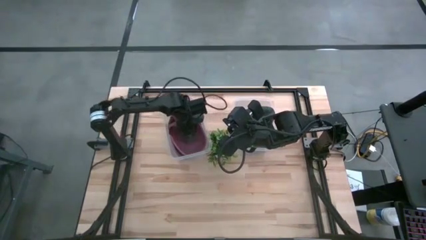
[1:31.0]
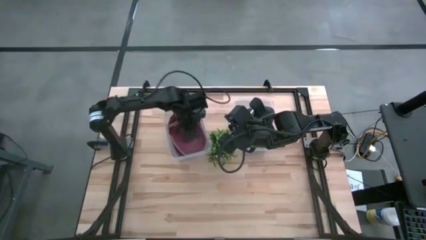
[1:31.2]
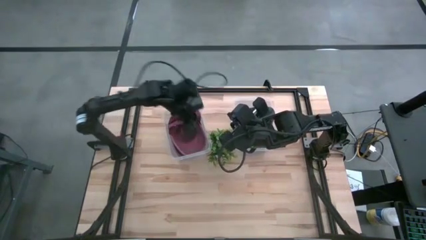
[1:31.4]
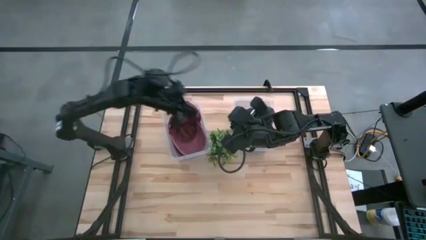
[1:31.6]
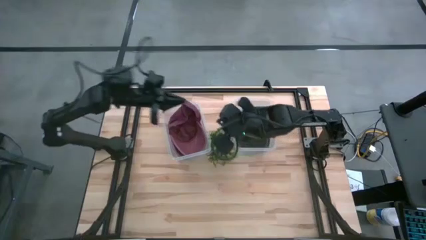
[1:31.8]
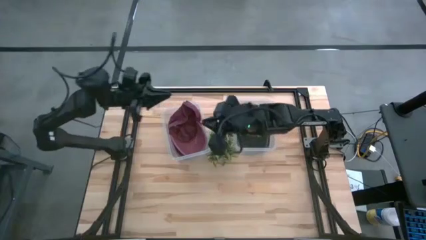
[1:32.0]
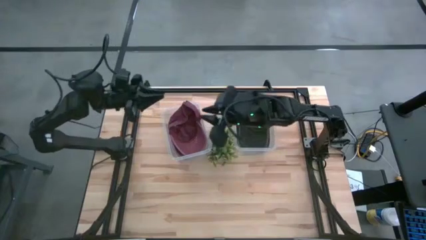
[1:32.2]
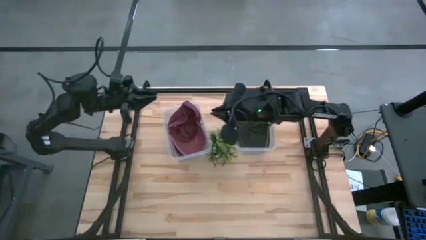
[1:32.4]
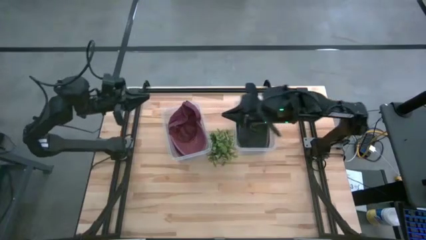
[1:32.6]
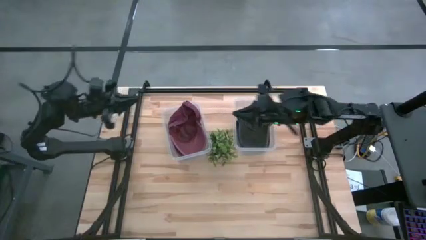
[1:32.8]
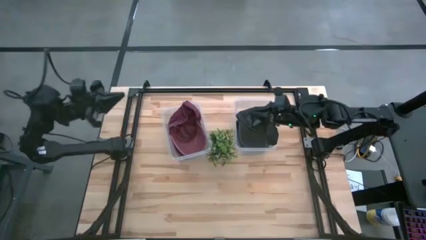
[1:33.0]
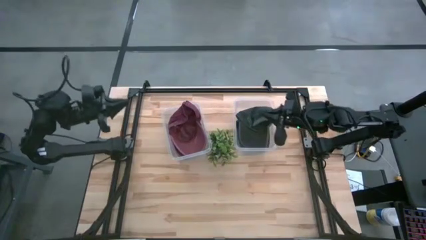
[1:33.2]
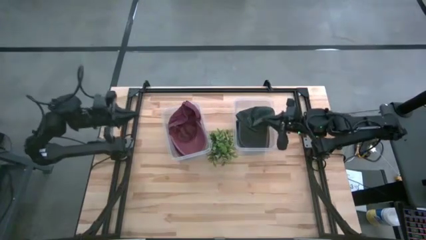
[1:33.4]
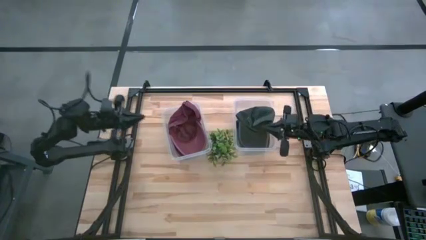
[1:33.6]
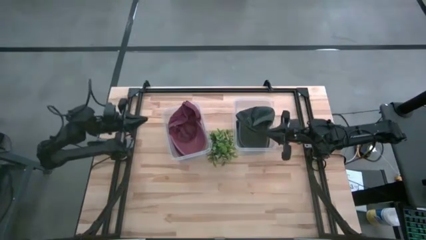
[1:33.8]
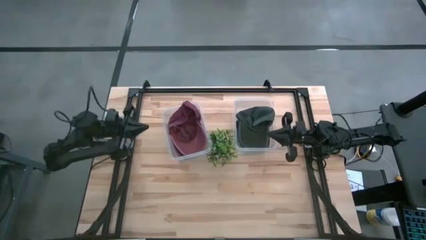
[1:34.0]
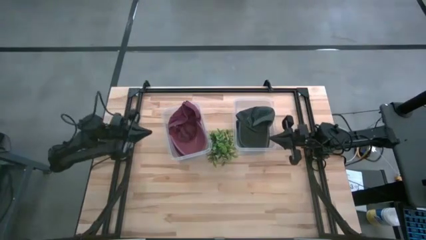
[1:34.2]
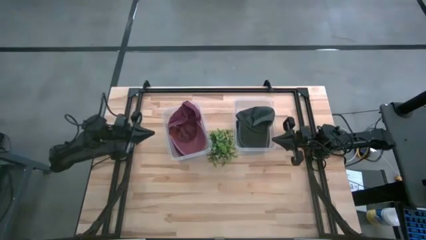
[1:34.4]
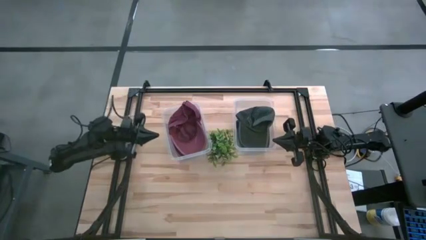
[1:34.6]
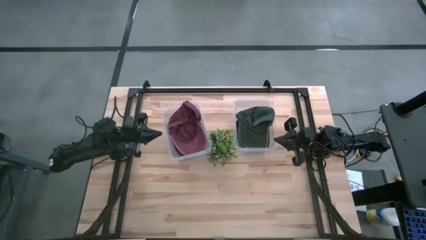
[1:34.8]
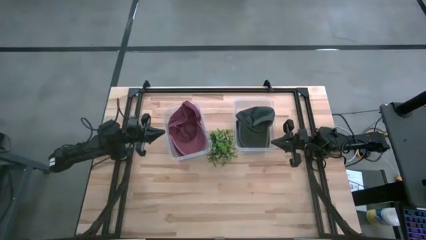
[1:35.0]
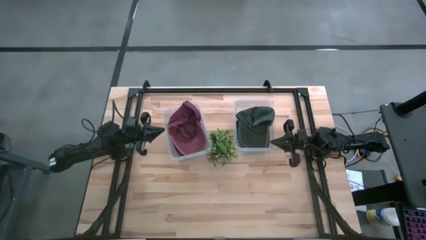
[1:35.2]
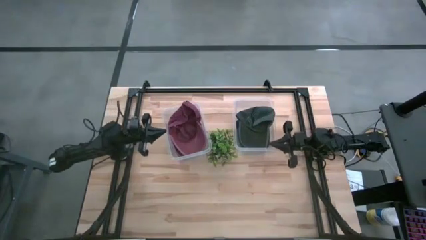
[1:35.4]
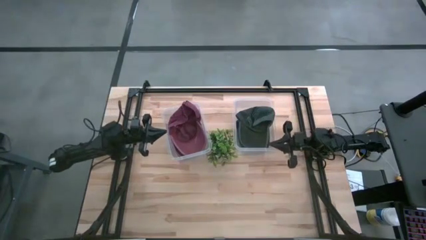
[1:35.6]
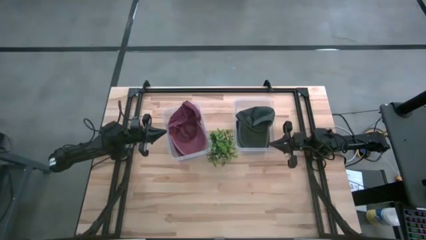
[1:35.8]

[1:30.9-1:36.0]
Task: Pick & Place hat
Return to home position

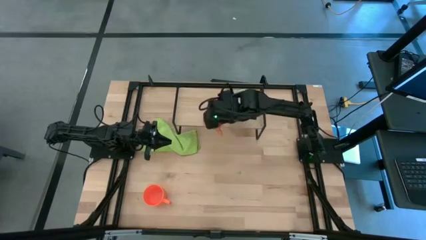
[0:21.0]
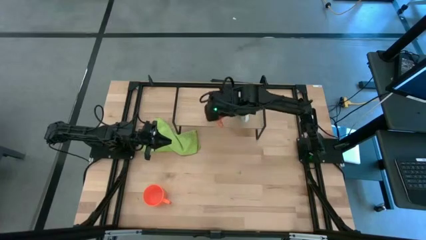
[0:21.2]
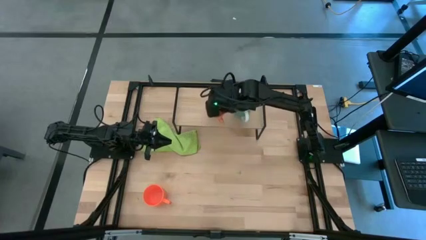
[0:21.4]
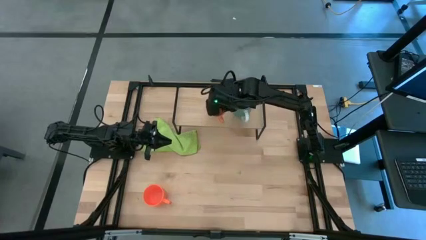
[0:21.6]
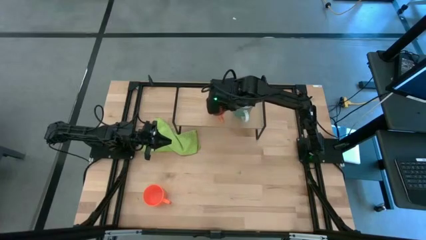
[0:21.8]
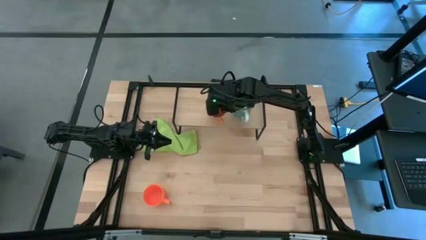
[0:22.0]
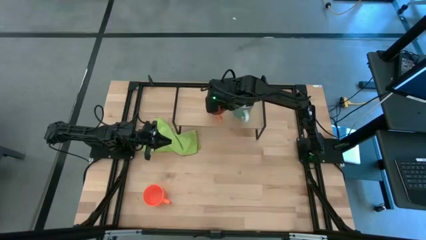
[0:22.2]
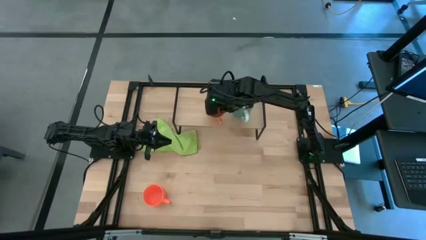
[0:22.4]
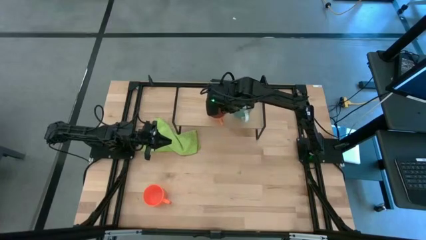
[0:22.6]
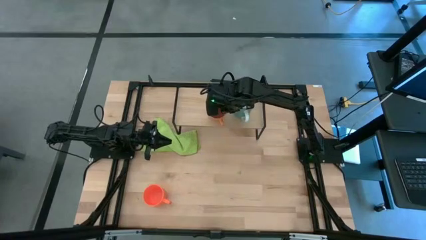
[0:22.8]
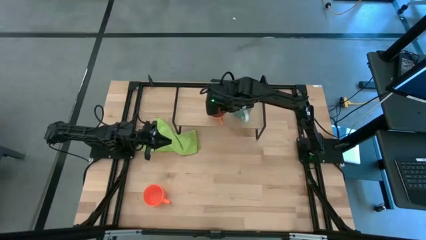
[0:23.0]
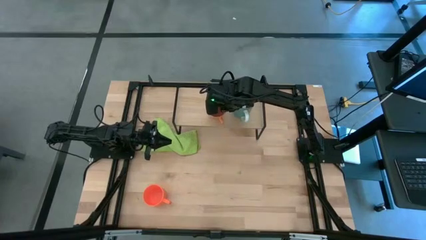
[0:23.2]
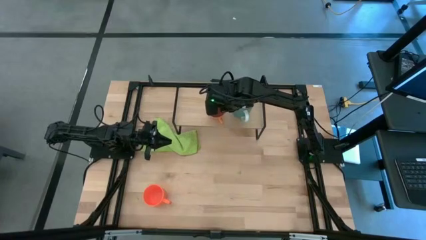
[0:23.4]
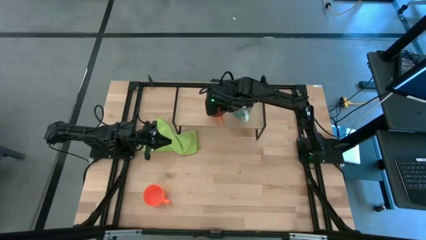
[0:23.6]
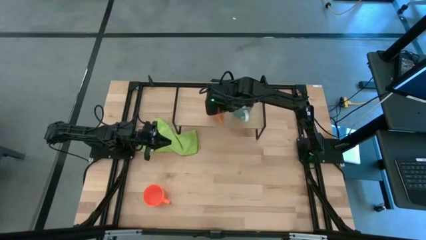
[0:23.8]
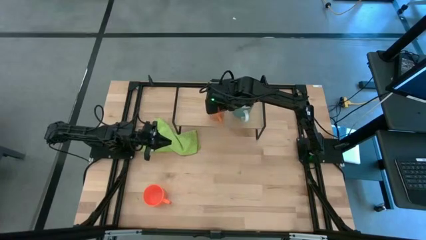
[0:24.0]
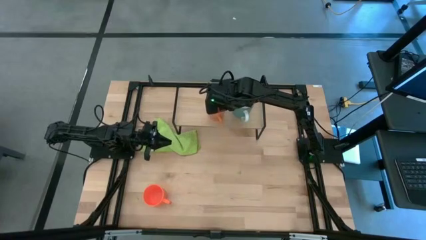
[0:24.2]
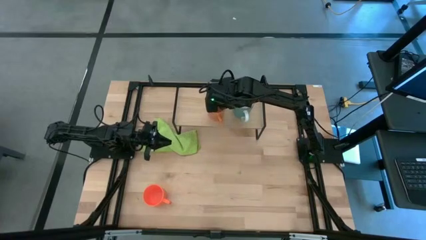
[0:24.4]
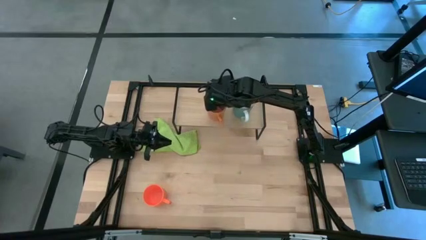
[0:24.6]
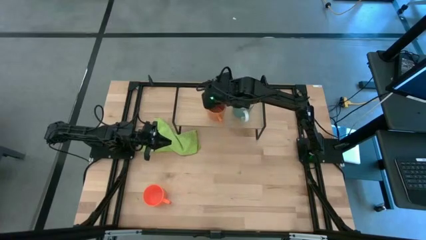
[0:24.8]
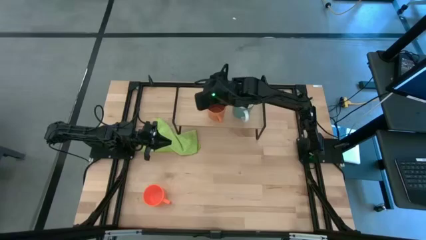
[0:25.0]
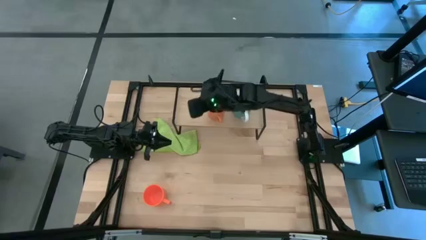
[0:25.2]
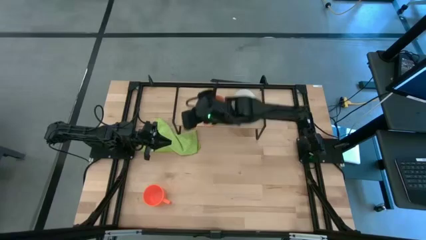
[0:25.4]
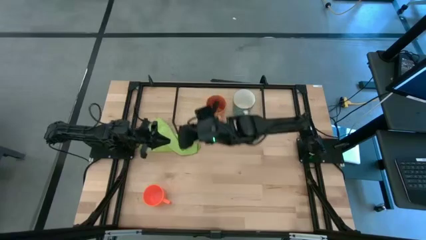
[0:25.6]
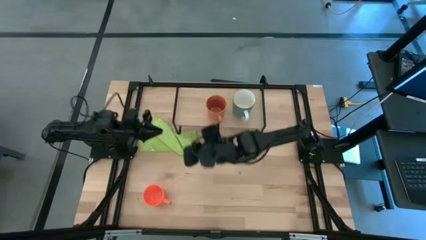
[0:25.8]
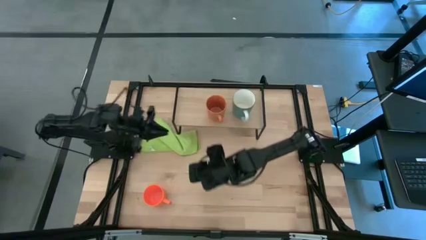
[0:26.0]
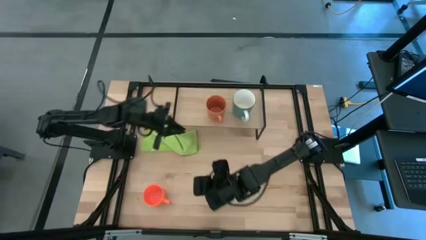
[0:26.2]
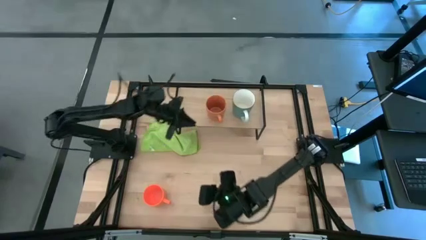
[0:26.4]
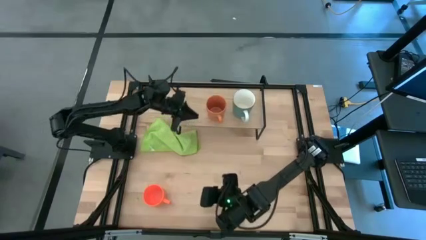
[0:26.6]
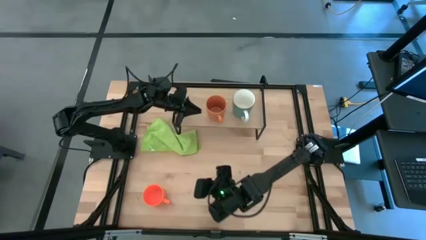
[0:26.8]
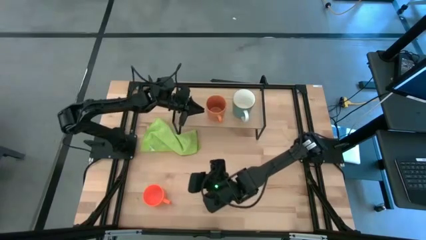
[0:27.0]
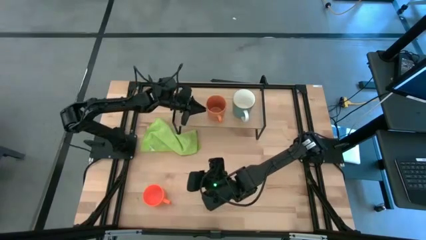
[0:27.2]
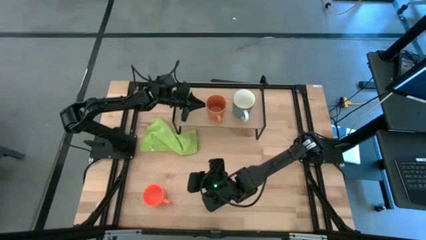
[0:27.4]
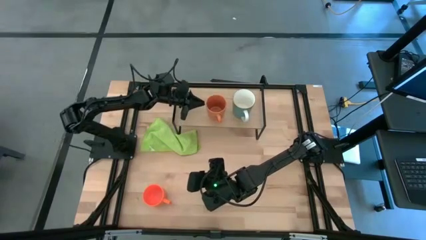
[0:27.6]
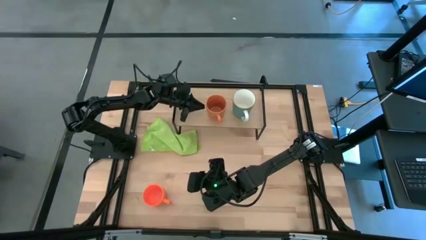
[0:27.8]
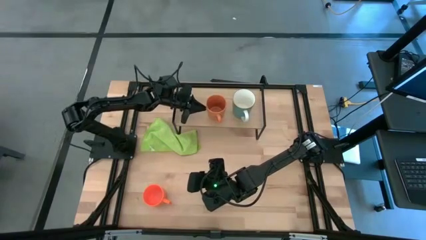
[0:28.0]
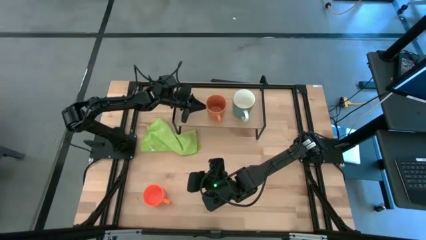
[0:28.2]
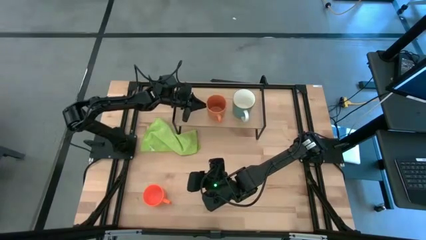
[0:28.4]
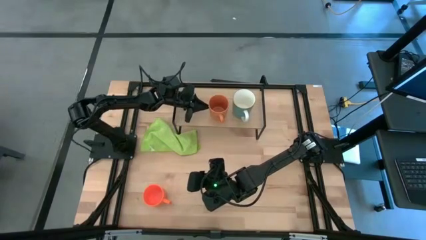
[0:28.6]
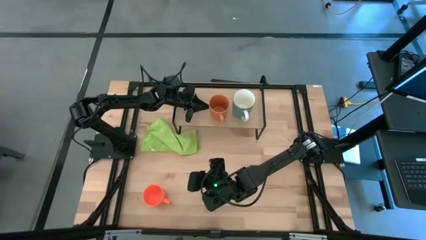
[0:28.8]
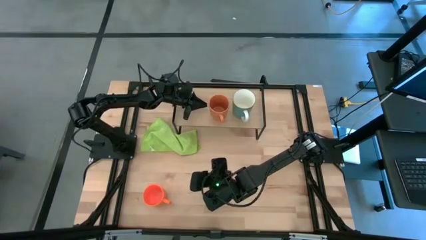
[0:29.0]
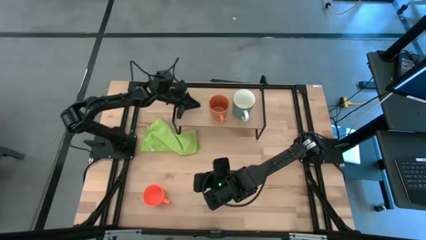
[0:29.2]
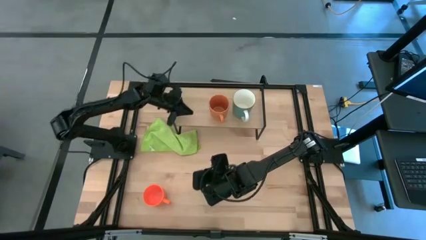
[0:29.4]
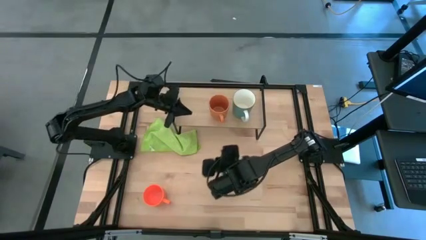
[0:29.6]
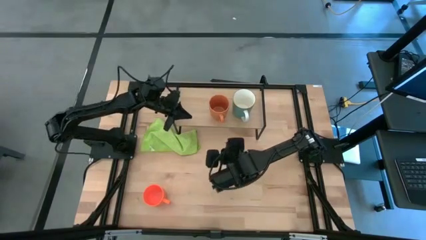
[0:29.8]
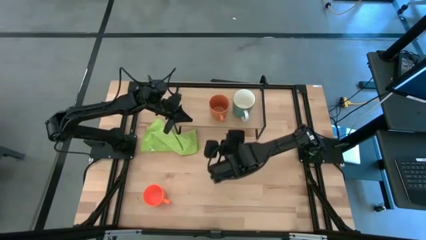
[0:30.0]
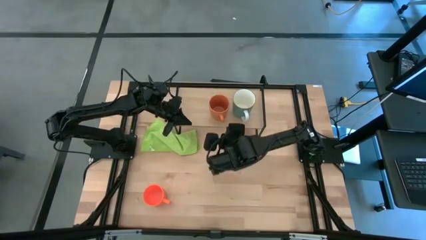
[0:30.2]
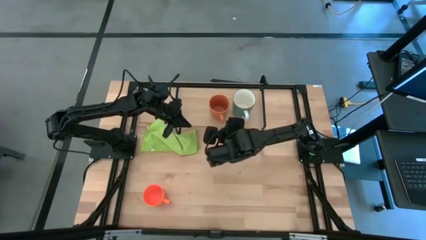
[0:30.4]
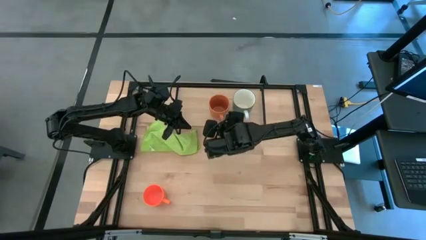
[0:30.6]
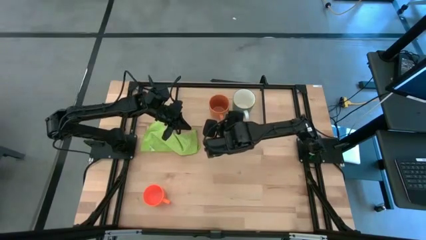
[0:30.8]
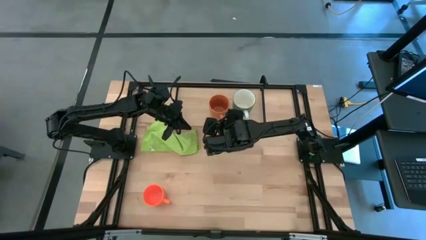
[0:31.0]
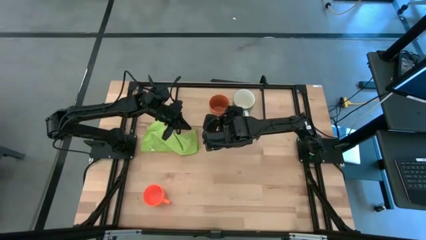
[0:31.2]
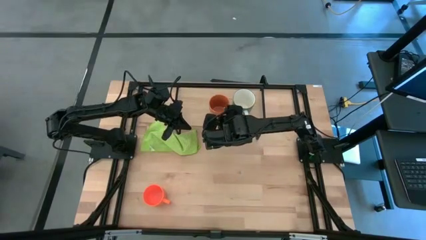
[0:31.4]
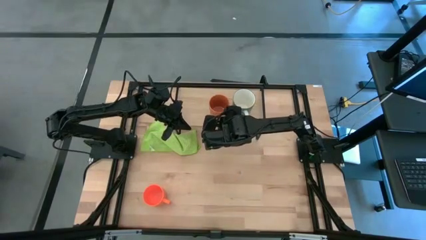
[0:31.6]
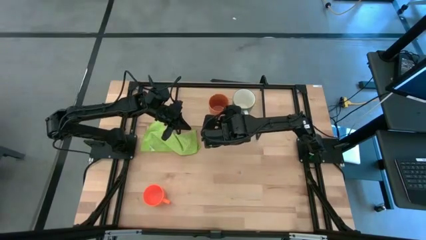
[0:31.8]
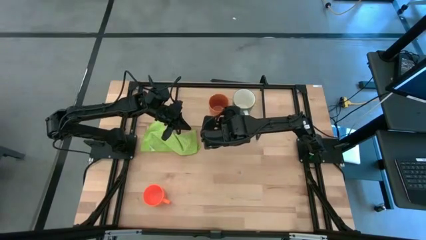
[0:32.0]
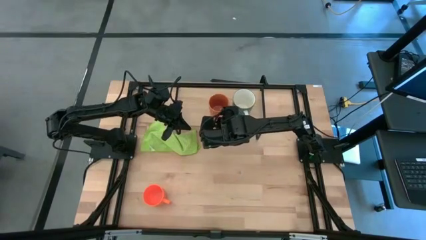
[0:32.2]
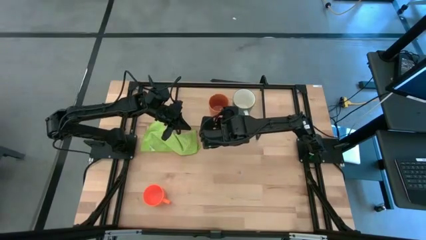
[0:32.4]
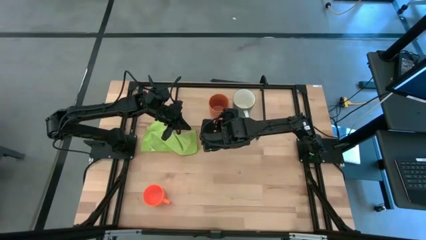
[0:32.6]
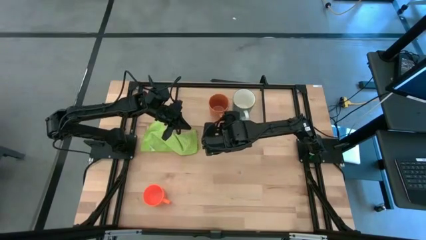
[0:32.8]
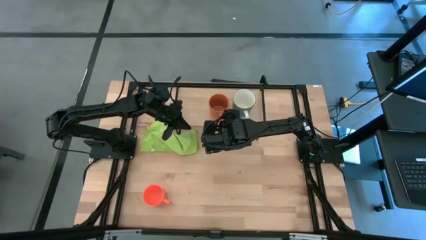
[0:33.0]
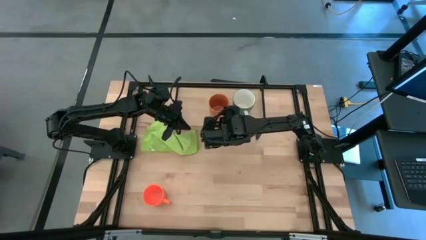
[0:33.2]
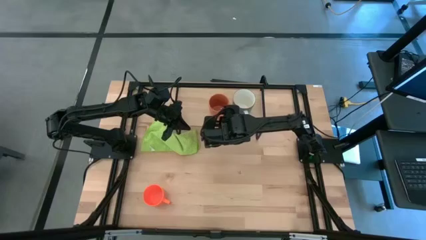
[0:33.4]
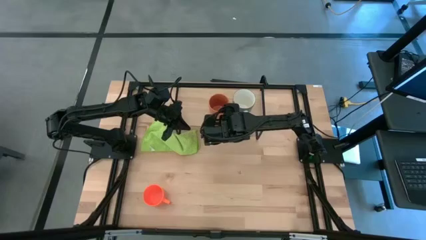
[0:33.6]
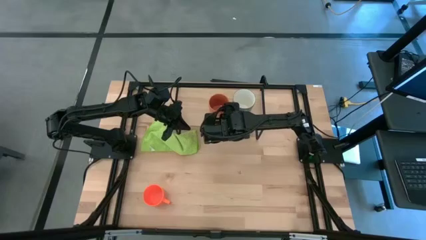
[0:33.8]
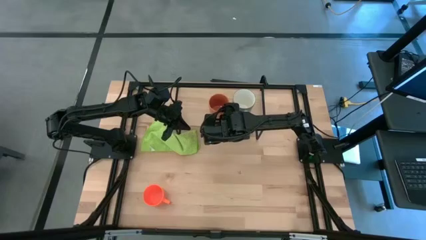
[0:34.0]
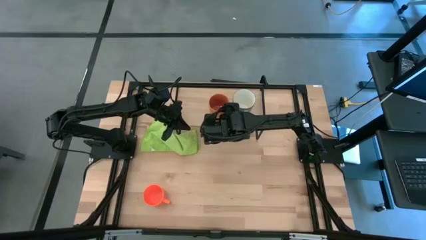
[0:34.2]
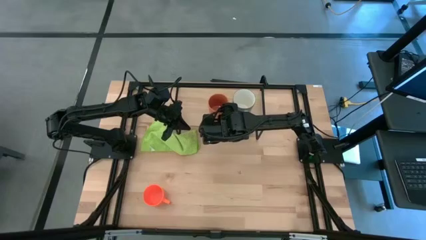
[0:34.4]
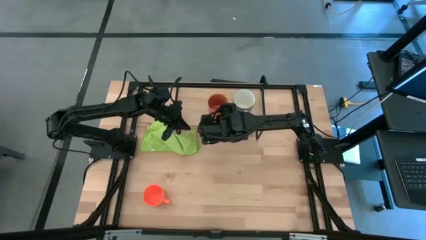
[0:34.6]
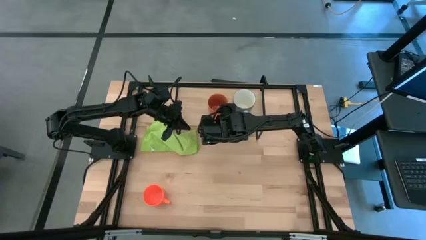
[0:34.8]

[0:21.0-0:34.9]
Task: Stack small to large cups/mugs on shelf
Put the light orange mug on the shelf
